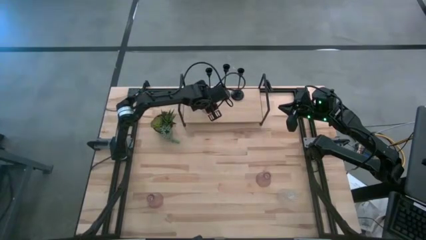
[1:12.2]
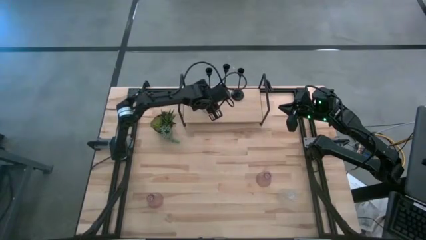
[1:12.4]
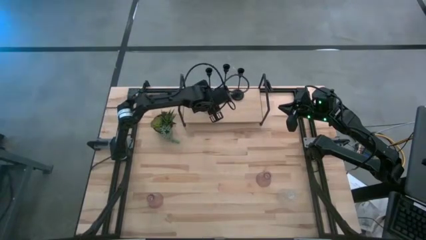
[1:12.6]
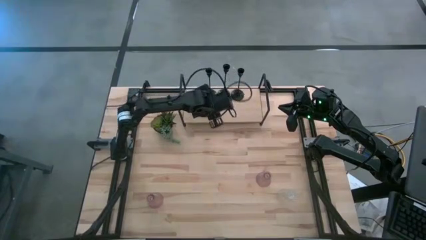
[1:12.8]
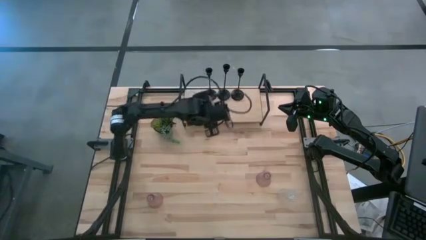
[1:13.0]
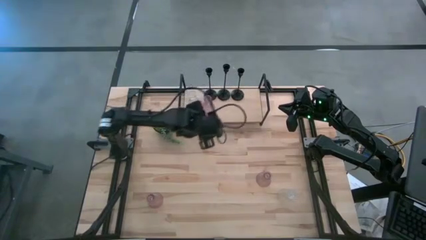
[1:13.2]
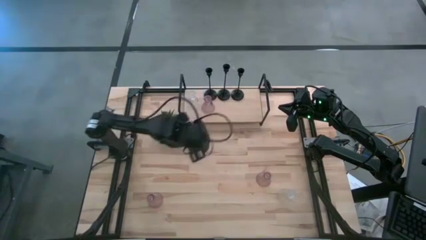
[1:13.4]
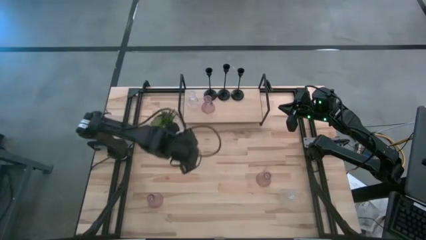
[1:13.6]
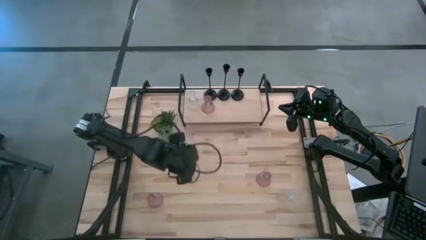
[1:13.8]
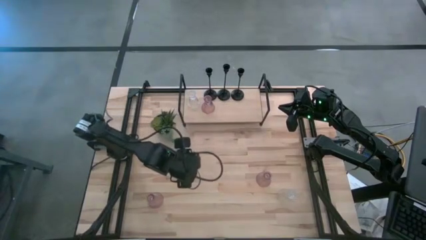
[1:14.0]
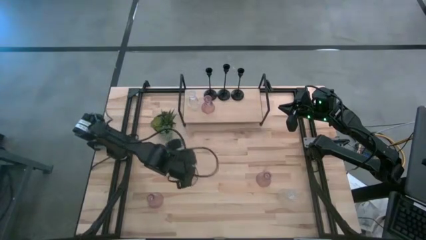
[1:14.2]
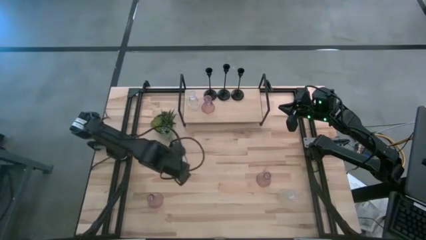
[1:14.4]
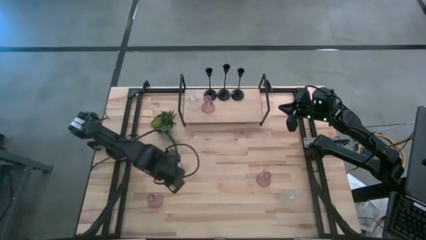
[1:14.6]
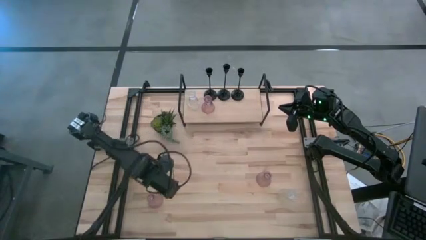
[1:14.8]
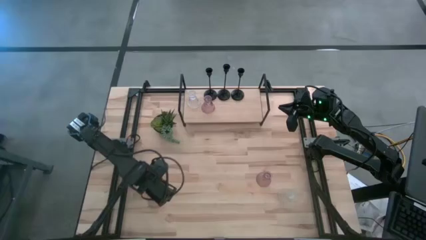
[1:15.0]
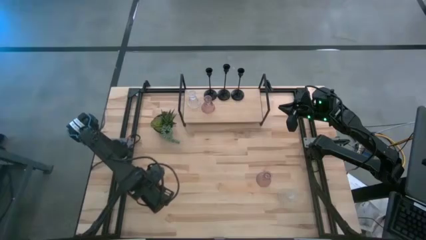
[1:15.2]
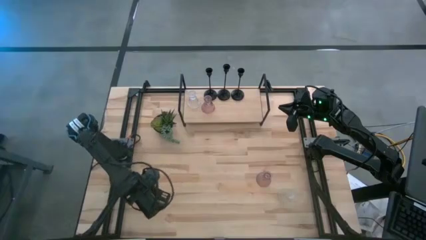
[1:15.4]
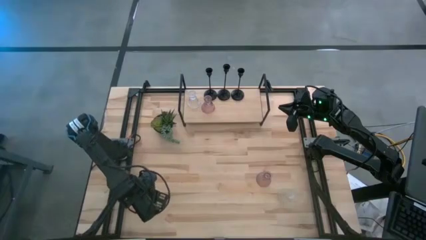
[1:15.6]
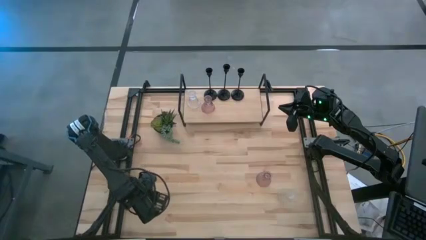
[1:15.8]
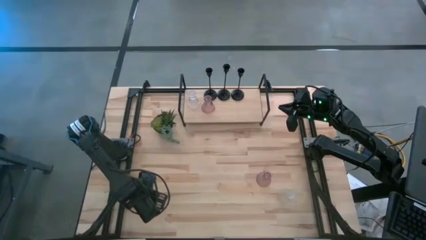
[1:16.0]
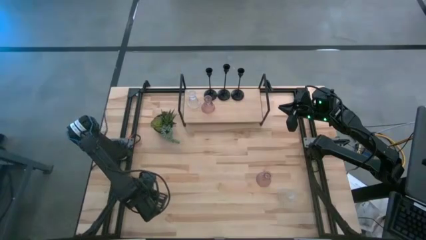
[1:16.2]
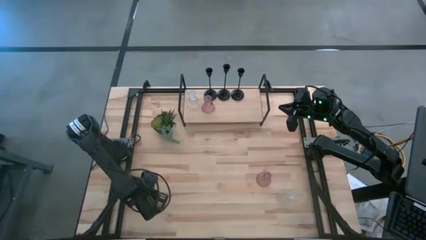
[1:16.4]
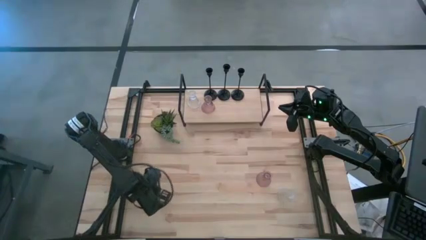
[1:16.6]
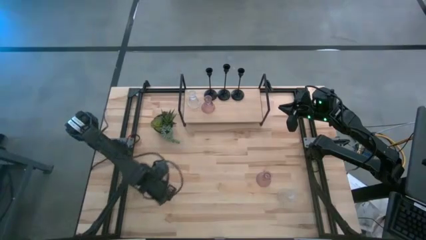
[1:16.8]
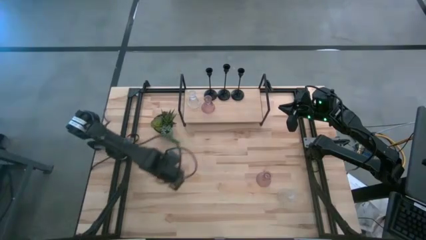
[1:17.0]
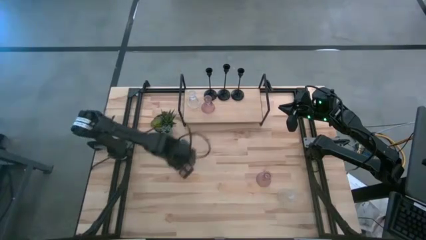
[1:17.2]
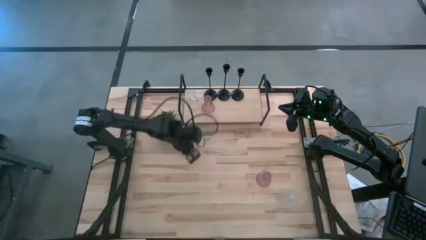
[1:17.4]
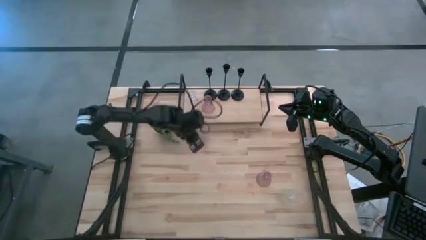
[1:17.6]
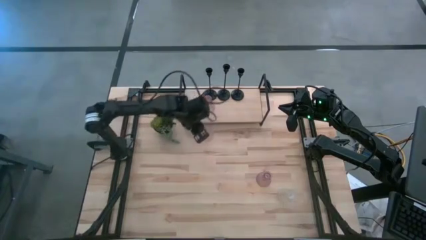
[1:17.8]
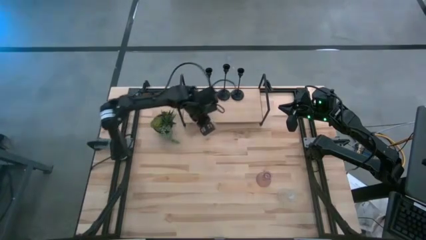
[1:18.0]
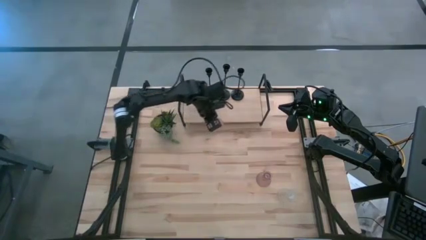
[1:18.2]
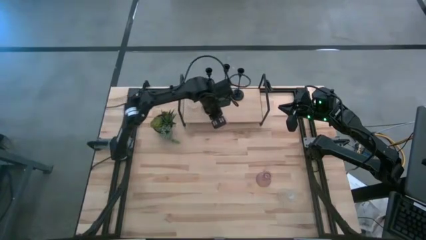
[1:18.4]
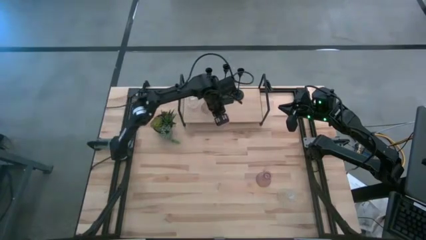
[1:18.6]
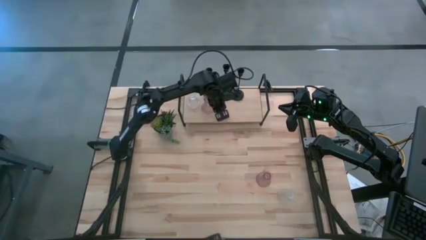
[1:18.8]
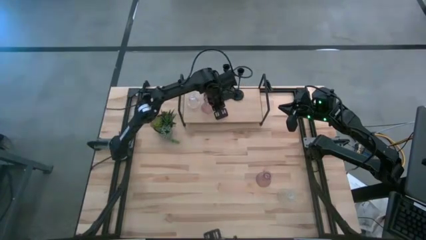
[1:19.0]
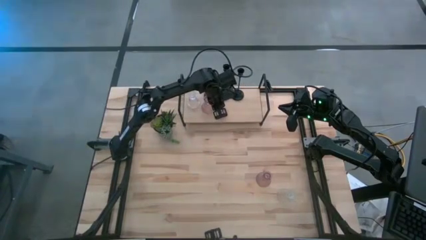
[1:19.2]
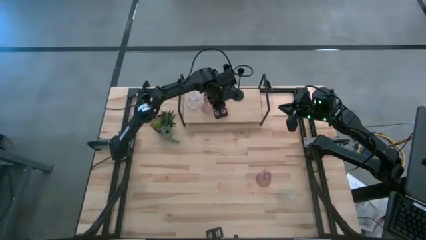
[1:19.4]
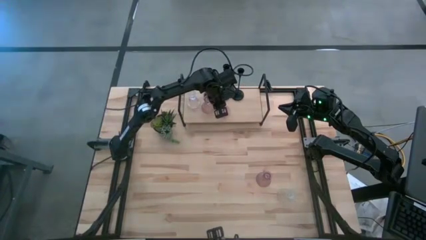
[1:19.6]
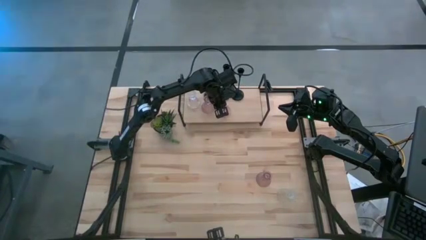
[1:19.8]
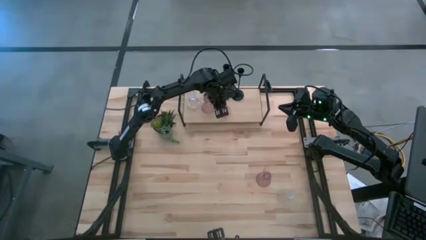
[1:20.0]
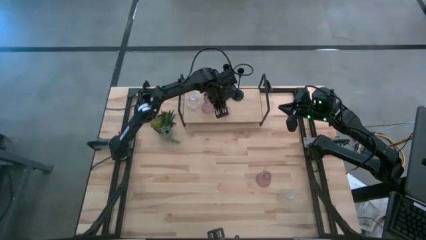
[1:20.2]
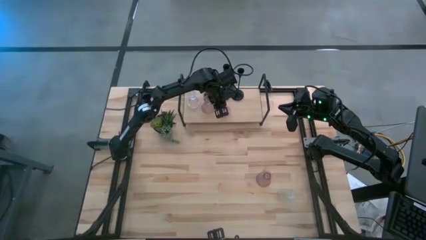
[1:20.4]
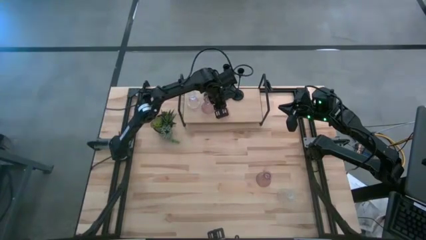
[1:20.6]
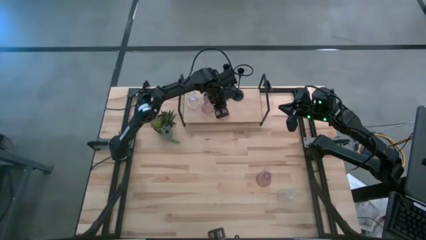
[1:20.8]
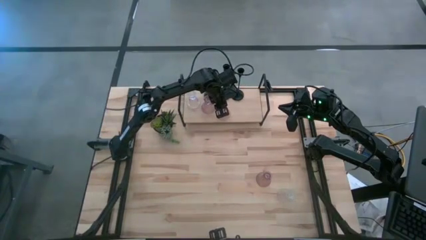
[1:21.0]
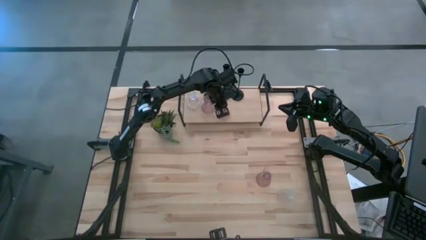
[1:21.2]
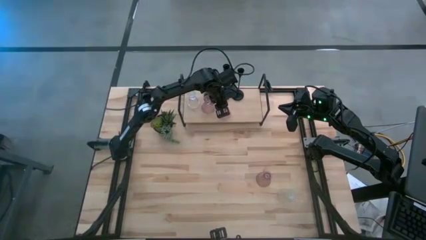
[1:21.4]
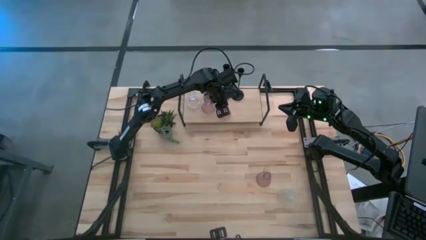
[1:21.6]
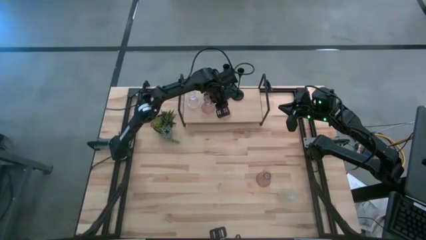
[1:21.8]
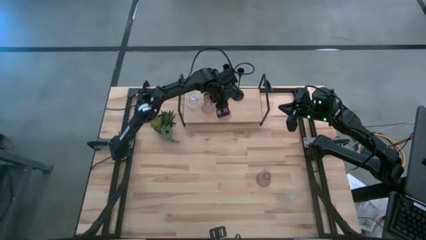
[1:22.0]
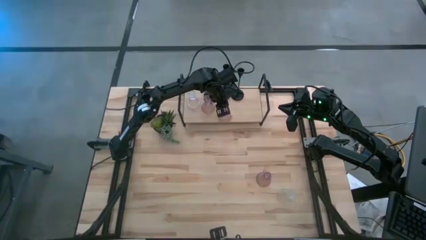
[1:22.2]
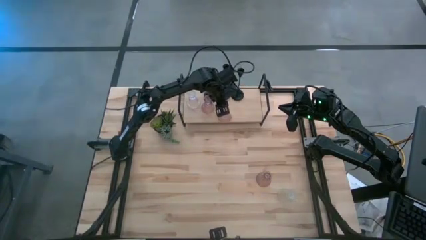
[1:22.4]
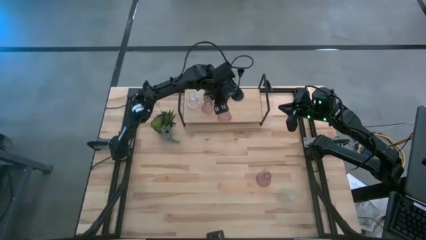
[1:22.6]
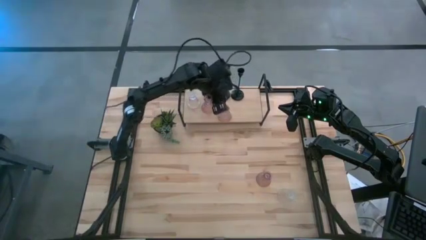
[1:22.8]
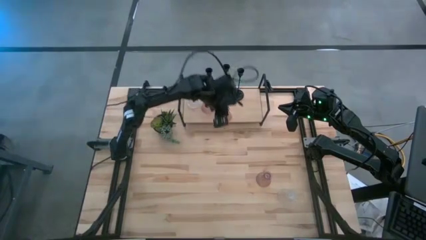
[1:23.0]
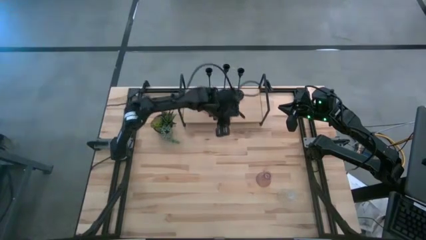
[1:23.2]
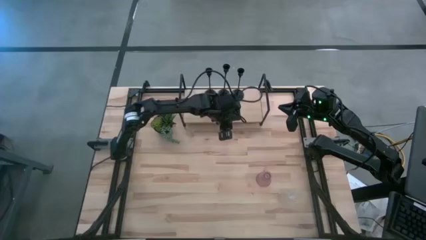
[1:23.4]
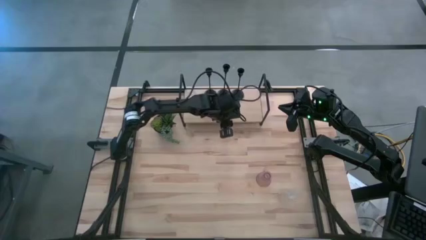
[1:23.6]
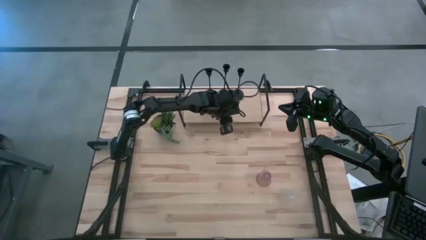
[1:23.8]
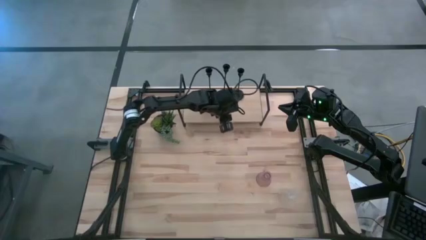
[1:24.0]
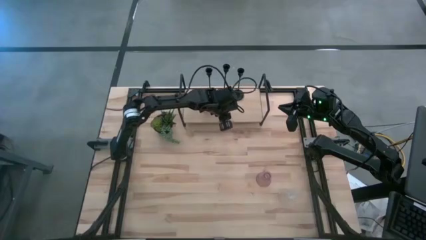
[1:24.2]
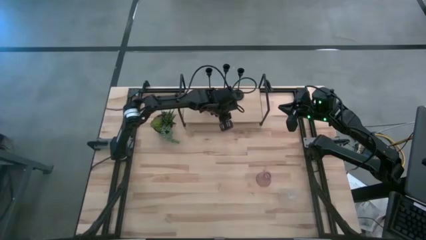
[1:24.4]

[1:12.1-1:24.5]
Task: Pick & Place candle stick holders
Put the bottom pink candle holder on the shelf aligned with the other pink candle holder

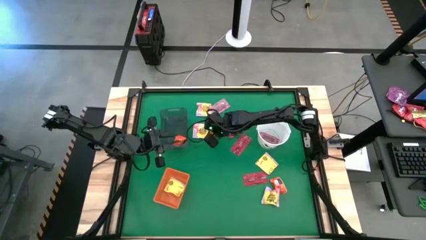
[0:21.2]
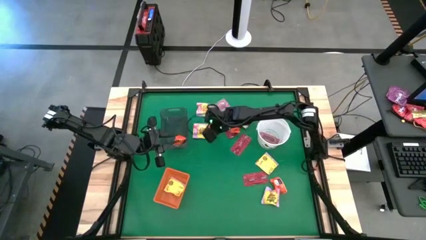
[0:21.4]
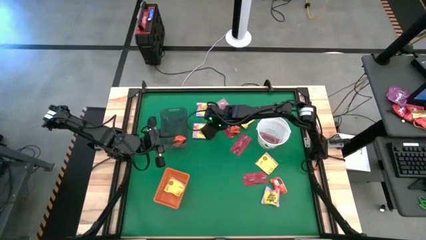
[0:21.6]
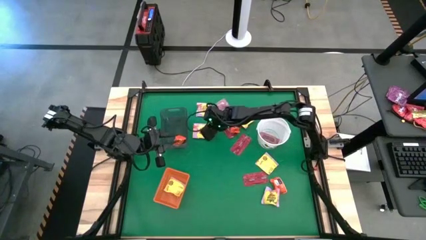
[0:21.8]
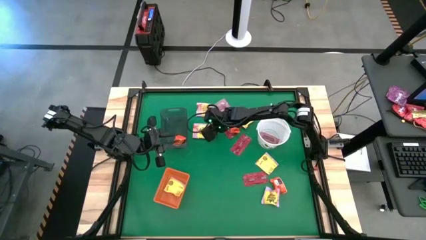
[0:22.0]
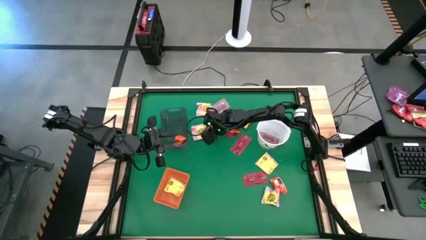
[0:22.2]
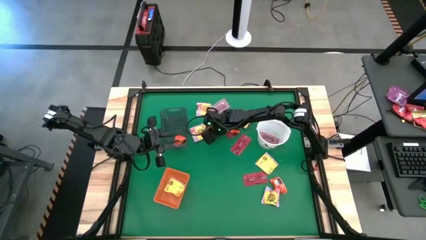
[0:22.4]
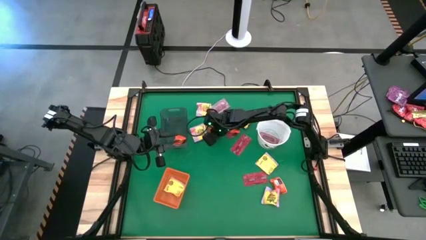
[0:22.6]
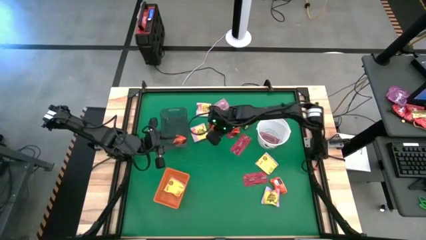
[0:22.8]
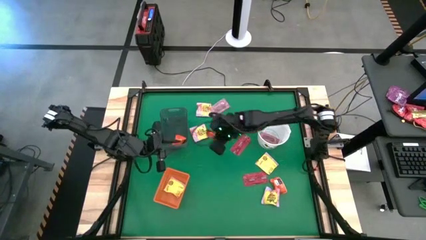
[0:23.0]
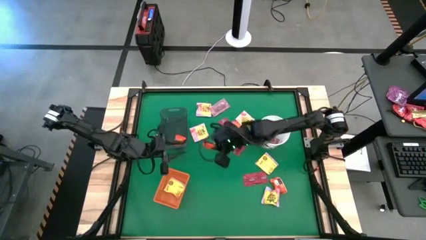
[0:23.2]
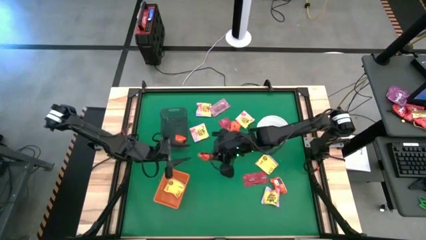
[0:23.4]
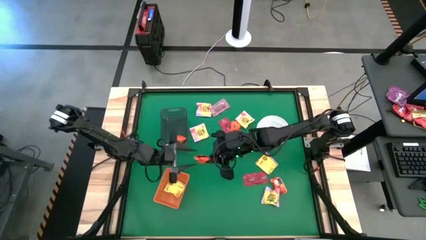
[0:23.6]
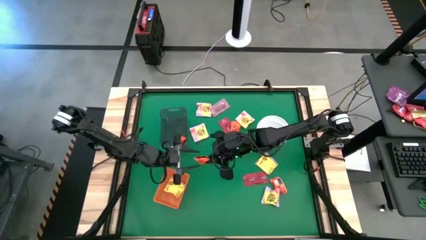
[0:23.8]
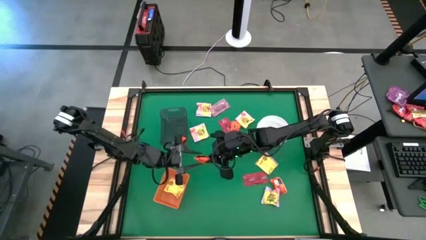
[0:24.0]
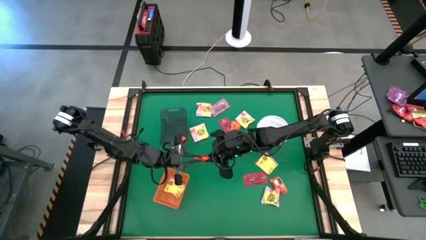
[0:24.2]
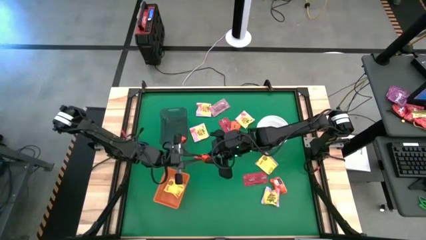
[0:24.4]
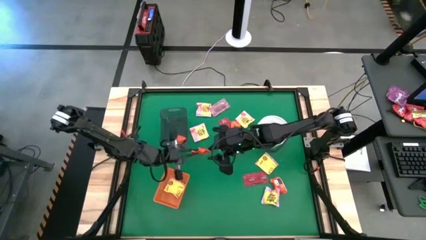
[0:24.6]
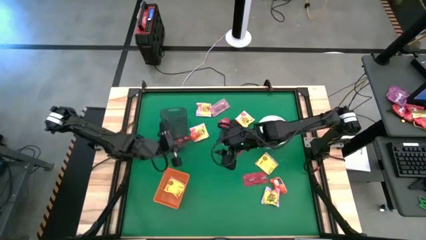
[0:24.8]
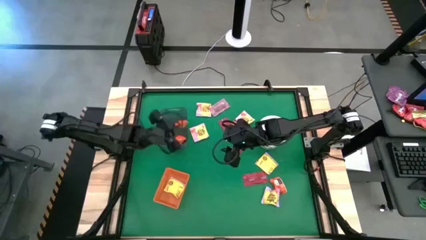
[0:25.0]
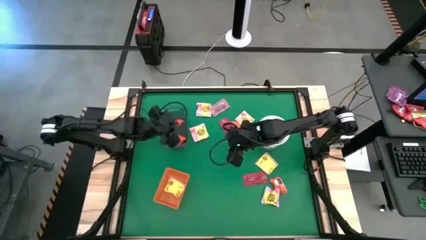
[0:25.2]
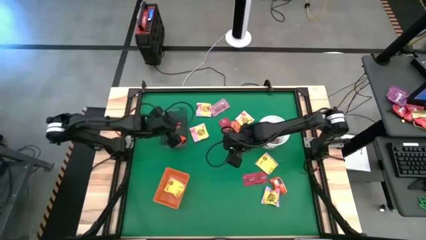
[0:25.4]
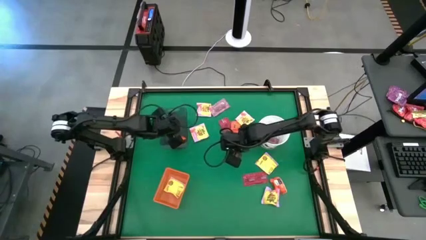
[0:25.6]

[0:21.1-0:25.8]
Task: Sort candy by brand, put in halloween buckets
Put the orange chocolate into the black bin
